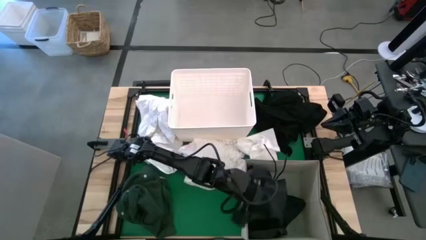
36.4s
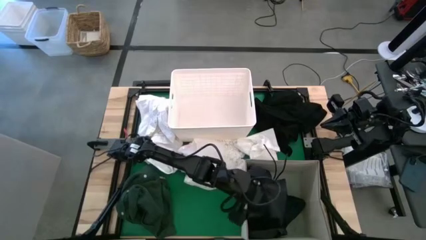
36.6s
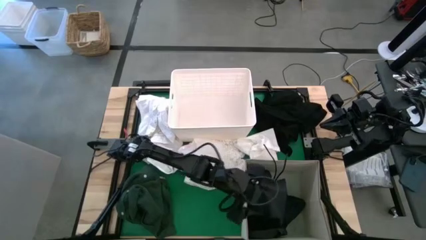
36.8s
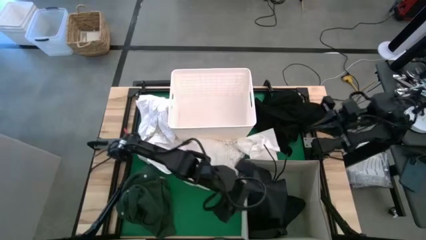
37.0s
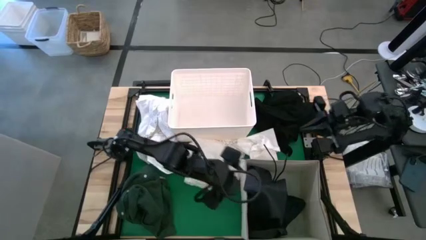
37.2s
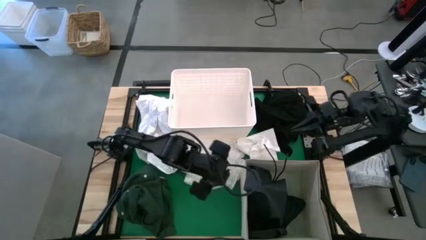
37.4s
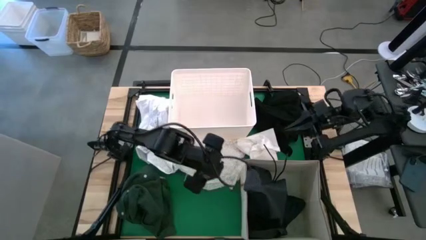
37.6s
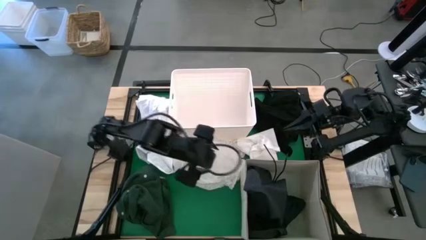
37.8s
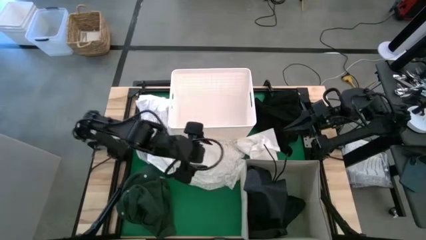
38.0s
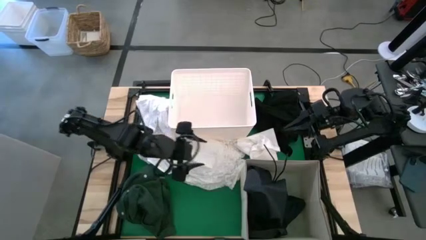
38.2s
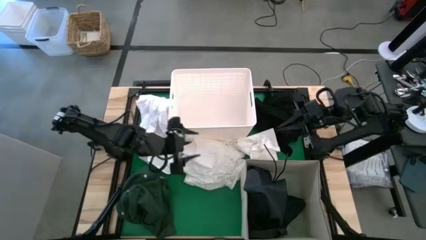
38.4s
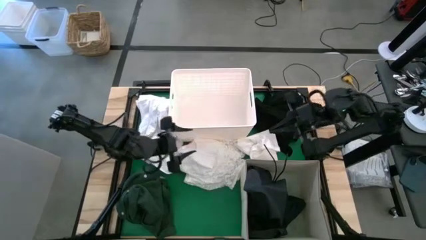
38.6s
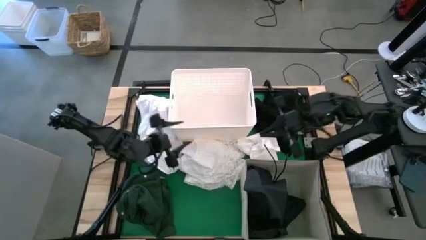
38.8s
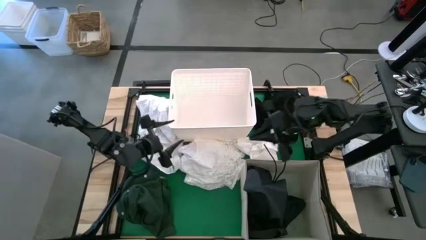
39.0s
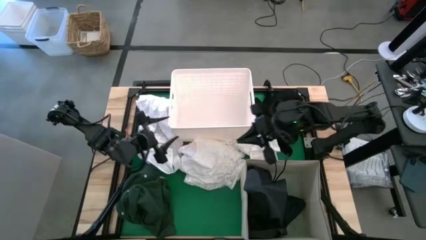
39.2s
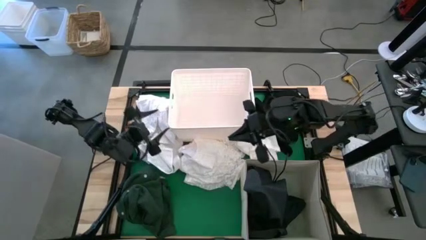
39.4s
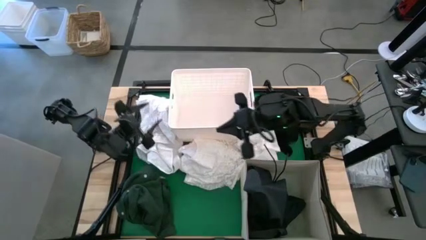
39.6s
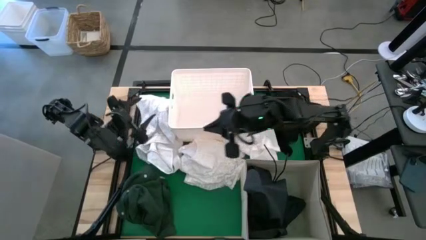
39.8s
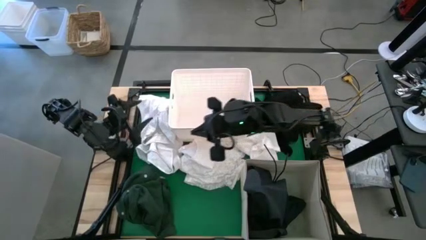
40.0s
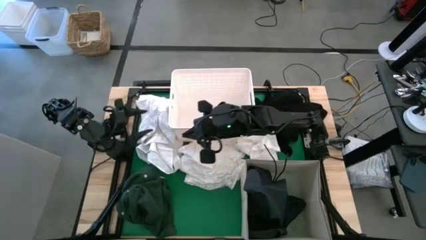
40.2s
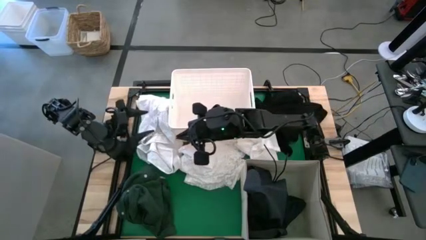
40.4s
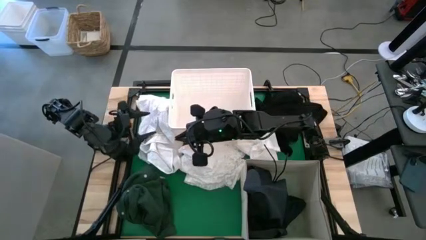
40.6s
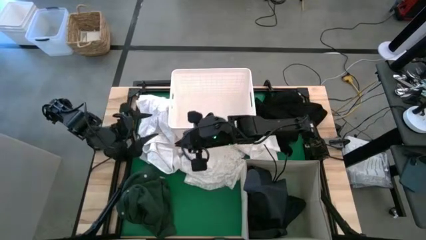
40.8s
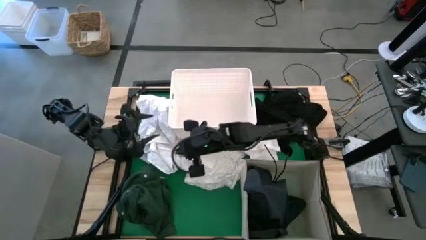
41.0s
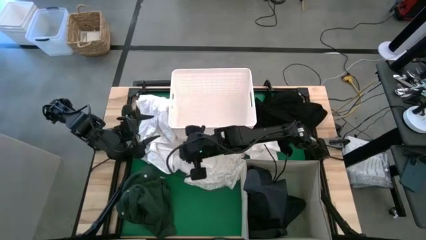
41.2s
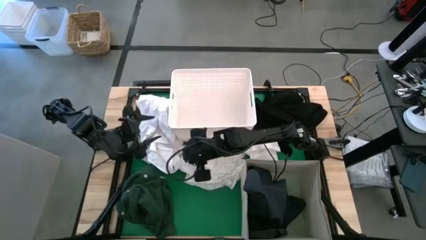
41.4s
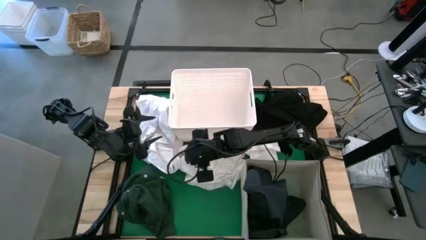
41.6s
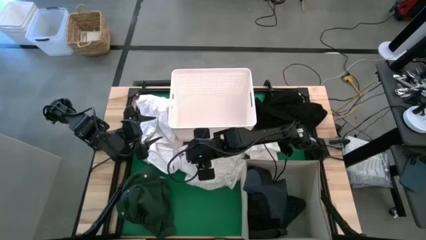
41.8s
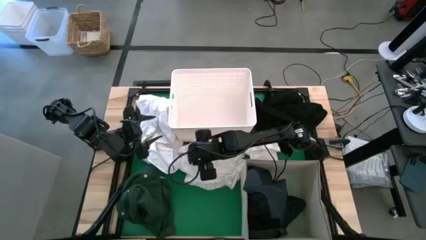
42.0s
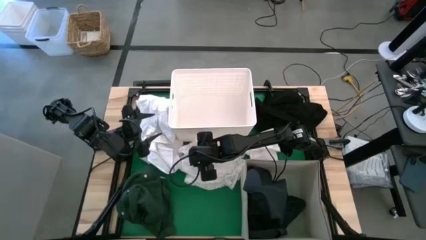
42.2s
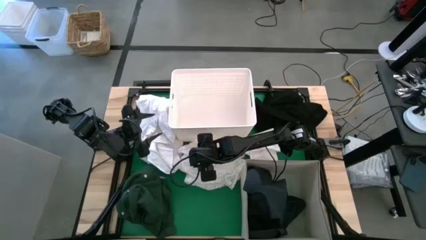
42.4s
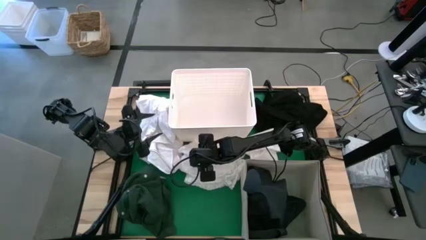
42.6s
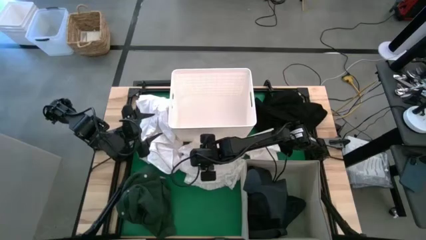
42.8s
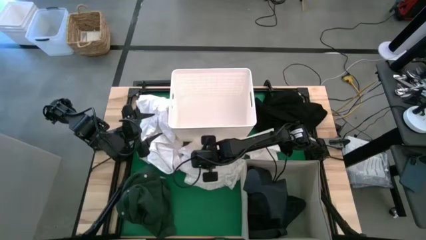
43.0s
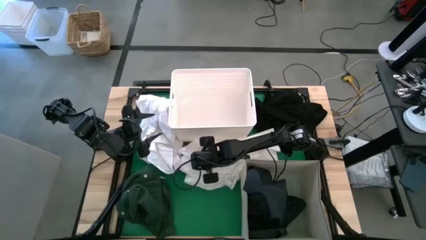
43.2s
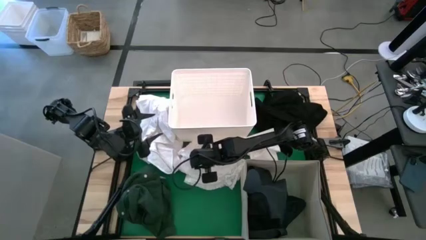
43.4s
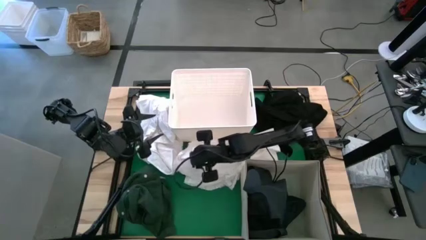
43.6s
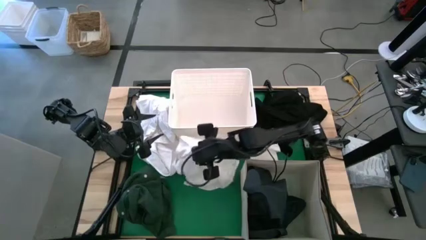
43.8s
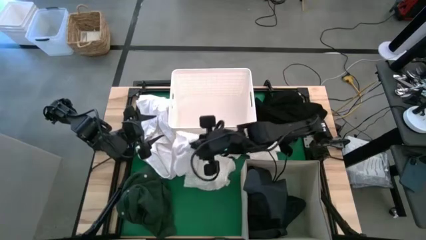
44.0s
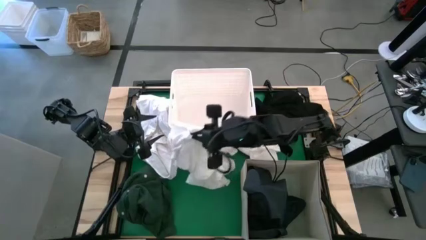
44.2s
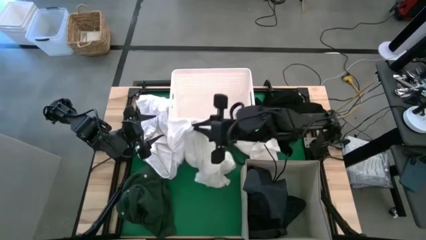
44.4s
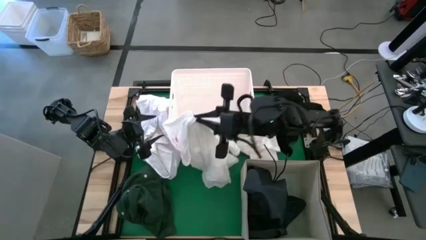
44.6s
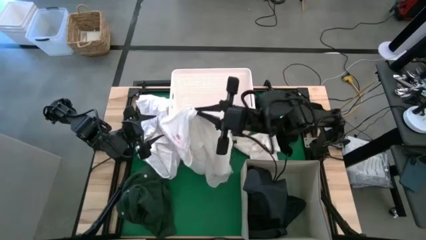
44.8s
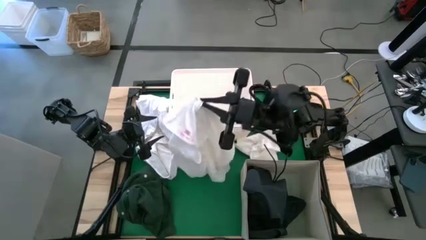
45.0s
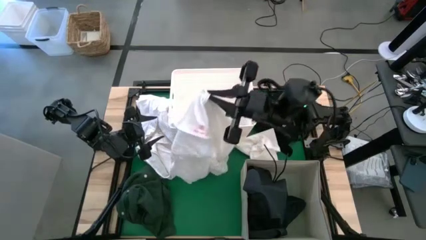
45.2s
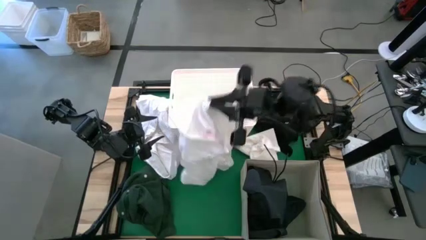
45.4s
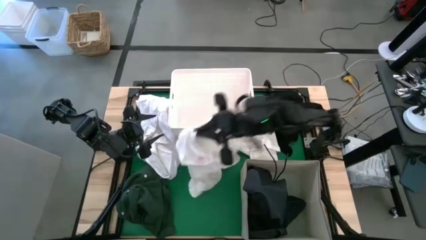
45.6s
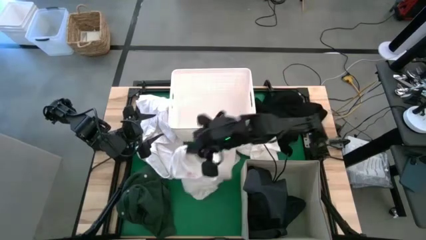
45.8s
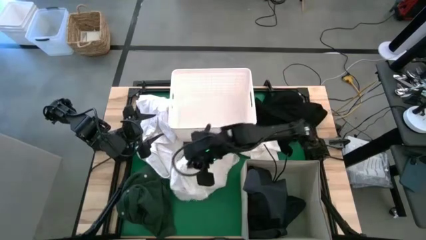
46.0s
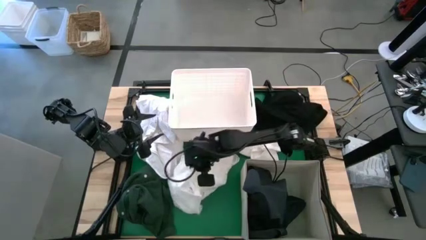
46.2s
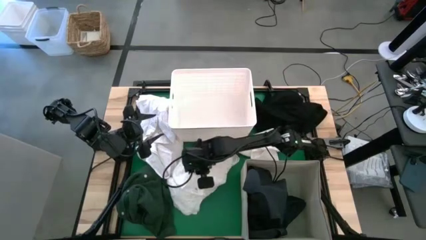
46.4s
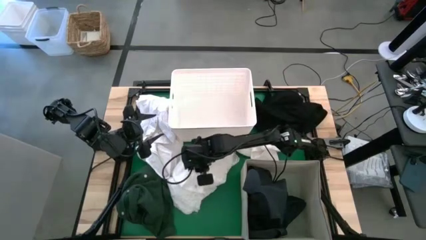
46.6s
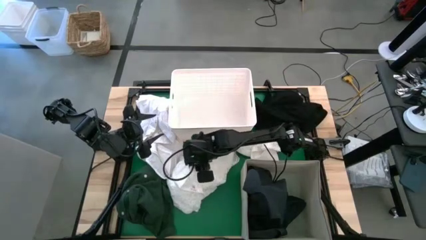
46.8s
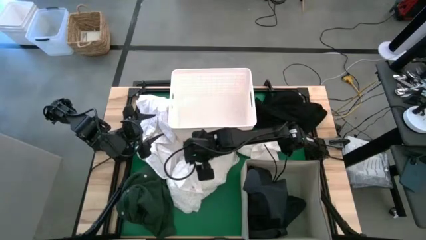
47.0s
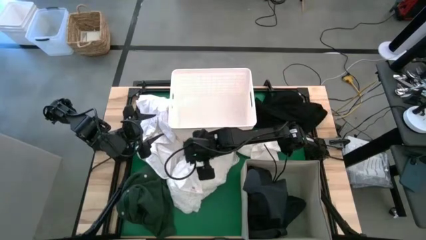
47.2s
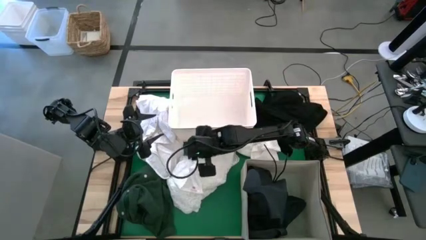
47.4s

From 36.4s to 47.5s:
Put the white cloth into the white plastic storage bin

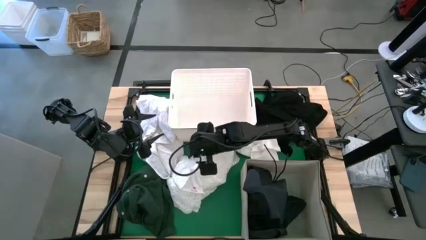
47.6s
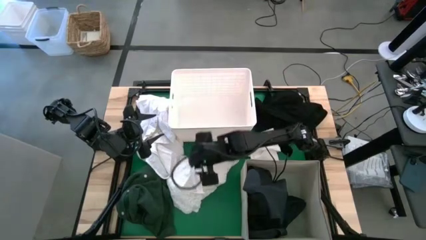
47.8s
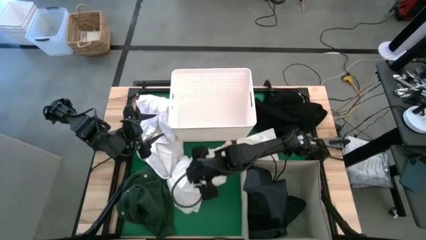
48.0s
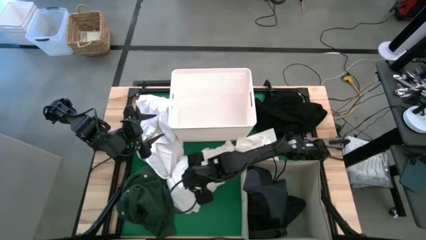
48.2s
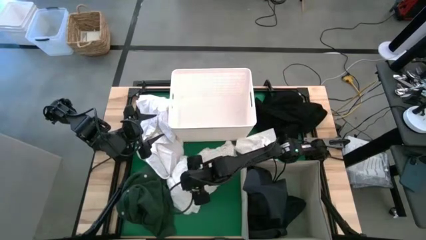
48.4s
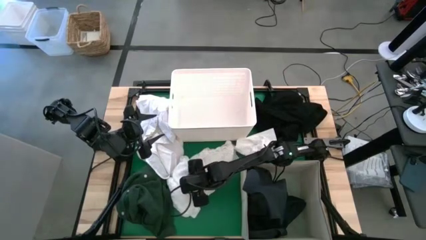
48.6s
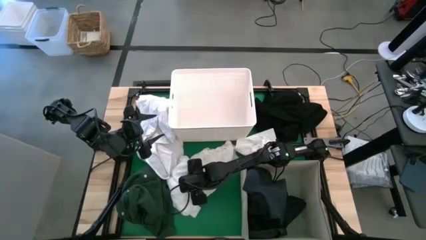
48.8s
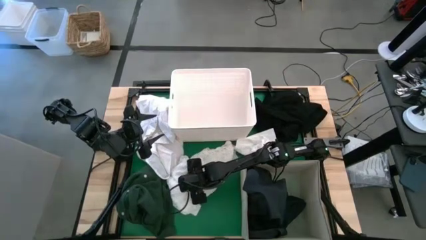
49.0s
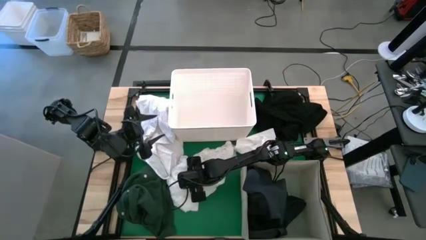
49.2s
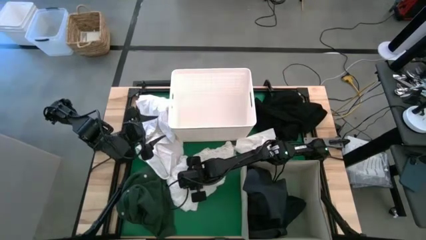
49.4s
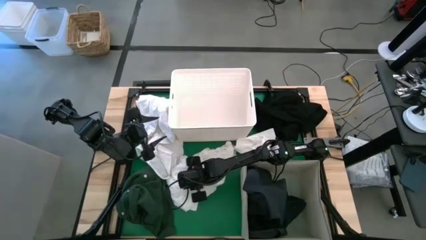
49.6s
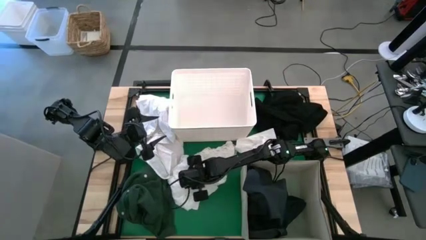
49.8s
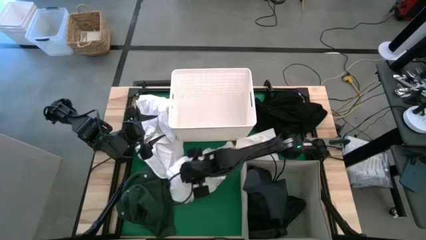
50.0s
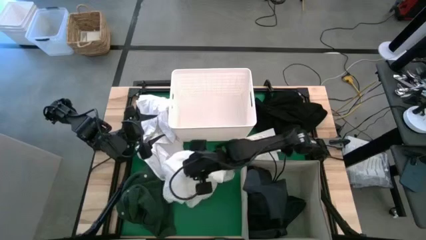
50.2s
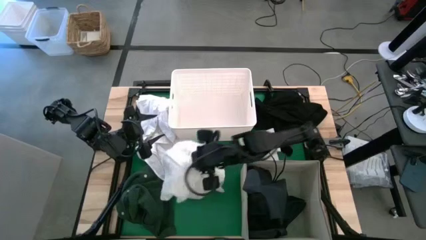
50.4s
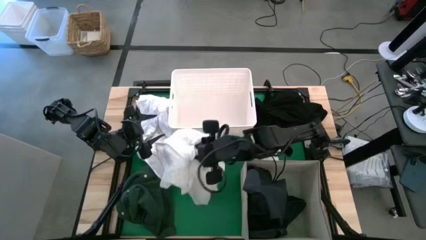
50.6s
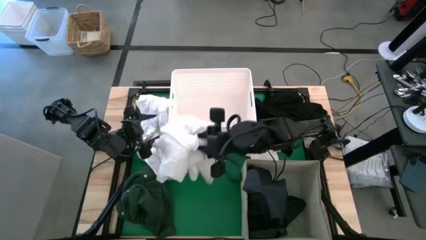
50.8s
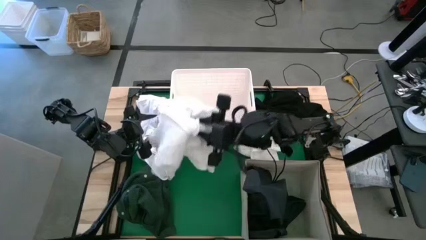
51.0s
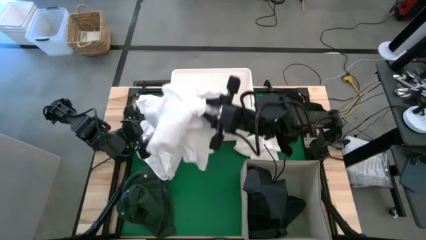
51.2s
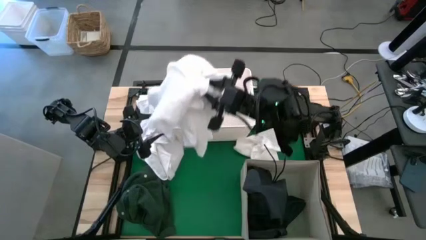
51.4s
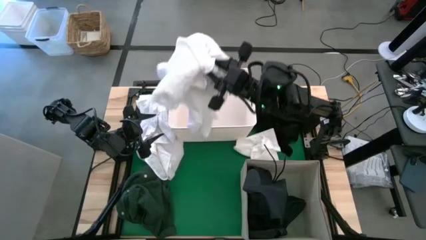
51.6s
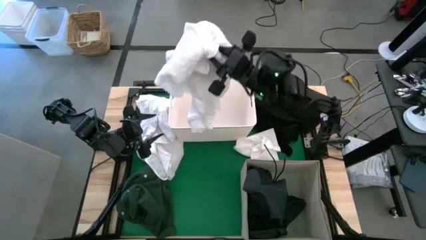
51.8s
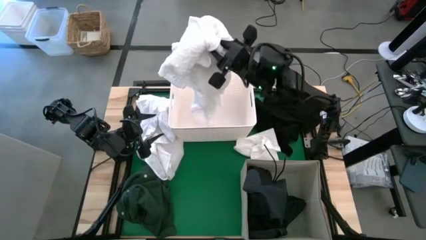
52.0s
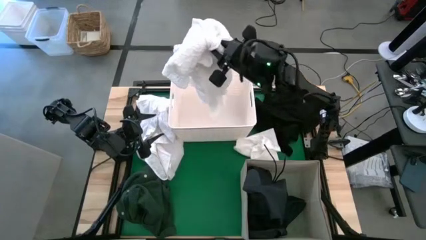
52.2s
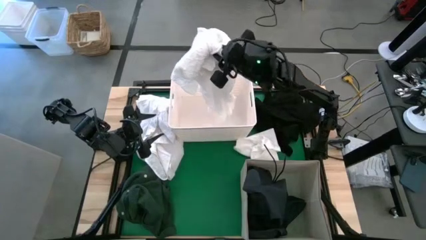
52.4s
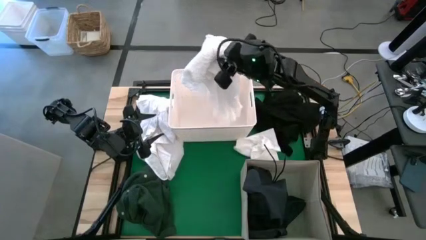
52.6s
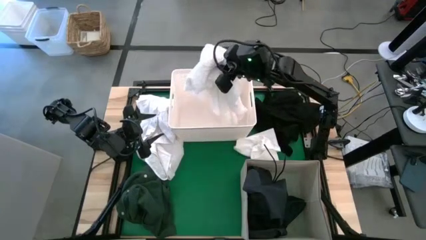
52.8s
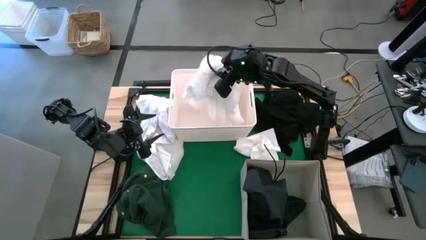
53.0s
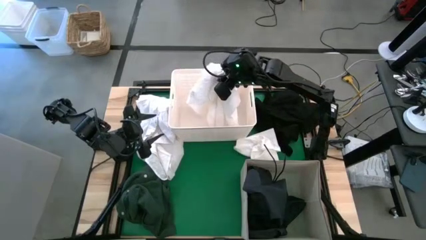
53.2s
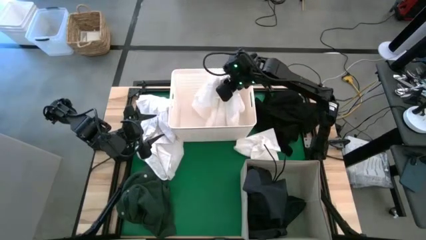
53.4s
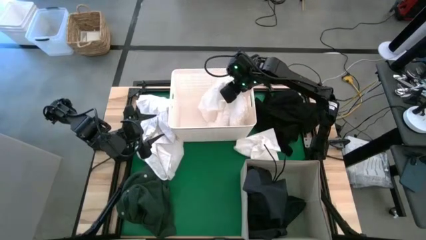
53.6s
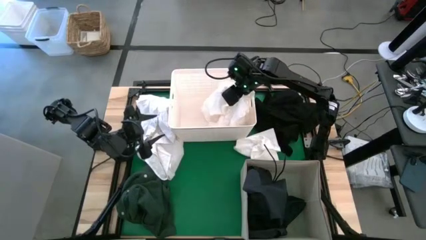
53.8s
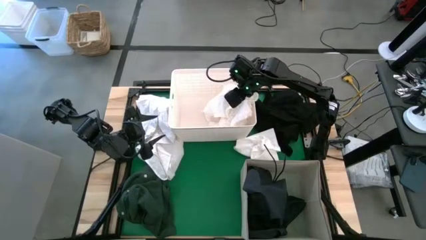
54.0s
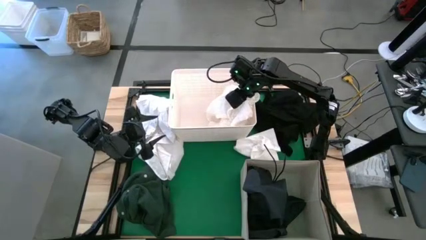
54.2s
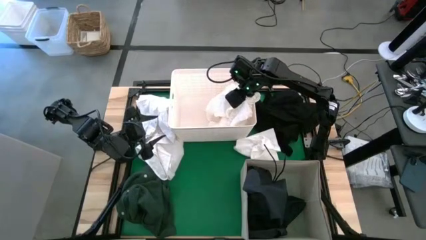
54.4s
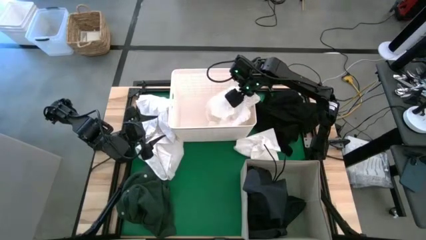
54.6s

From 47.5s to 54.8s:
Put the white cloth into the white plastic storage bin
